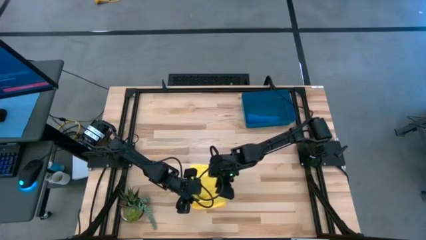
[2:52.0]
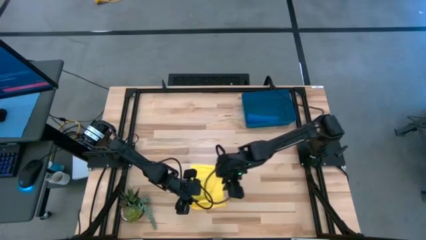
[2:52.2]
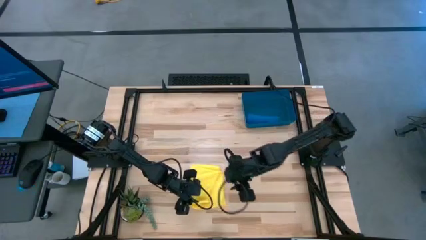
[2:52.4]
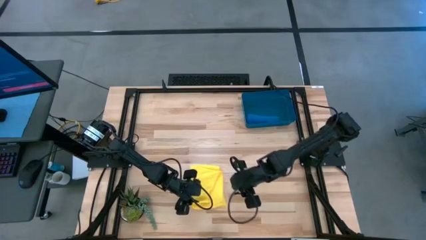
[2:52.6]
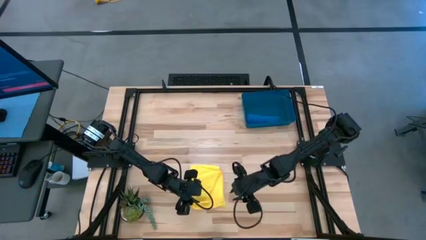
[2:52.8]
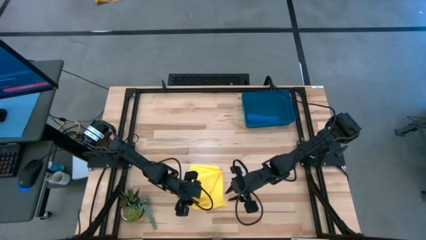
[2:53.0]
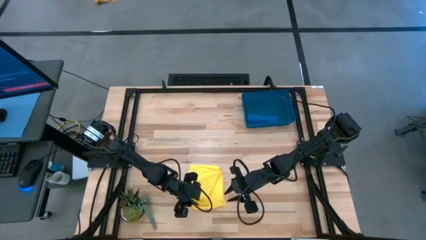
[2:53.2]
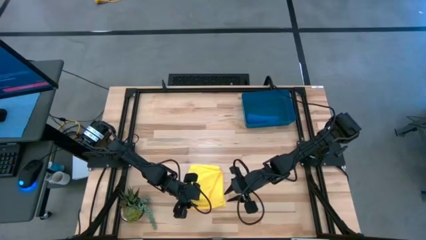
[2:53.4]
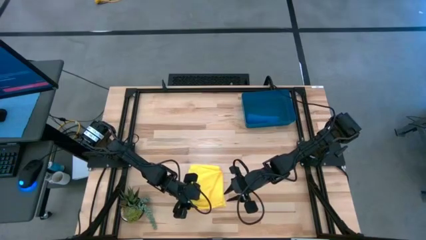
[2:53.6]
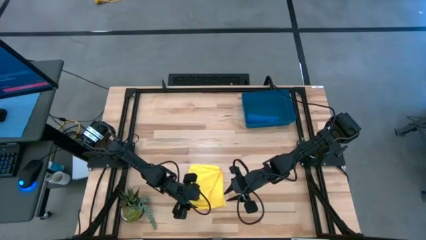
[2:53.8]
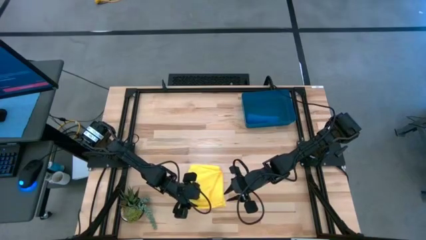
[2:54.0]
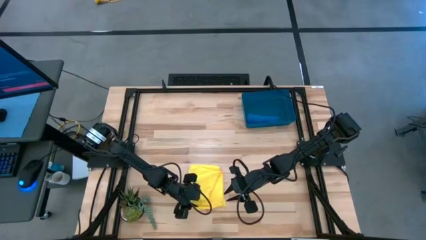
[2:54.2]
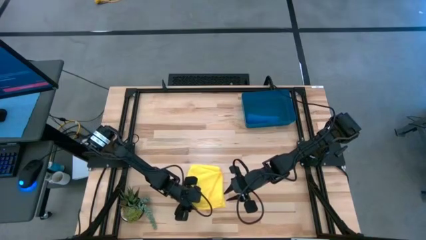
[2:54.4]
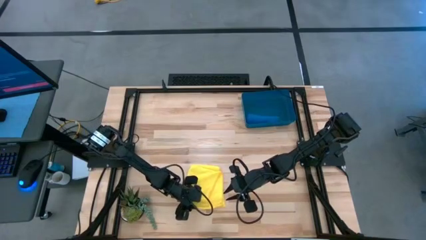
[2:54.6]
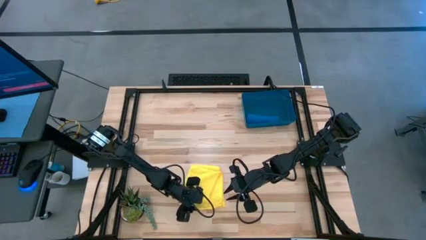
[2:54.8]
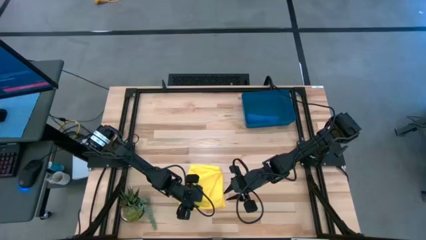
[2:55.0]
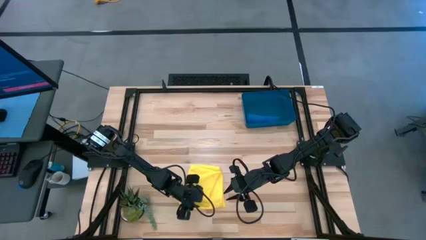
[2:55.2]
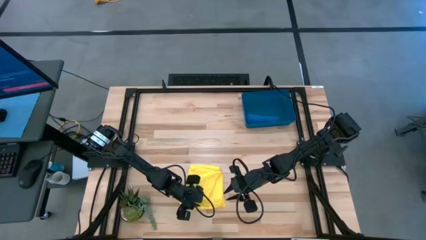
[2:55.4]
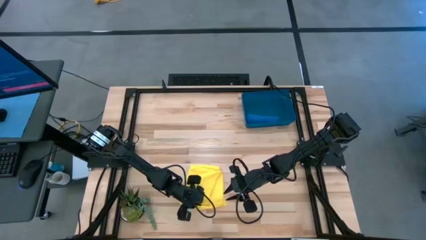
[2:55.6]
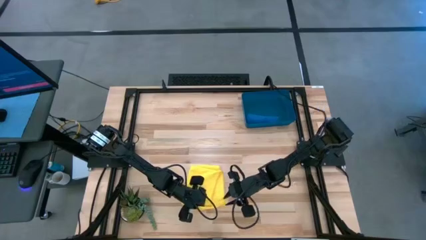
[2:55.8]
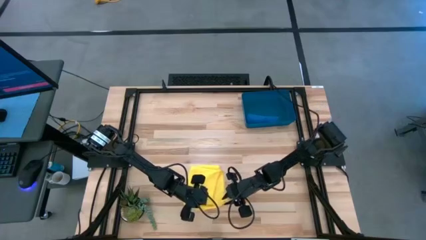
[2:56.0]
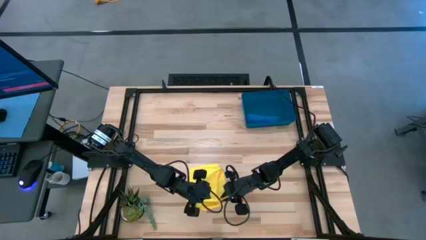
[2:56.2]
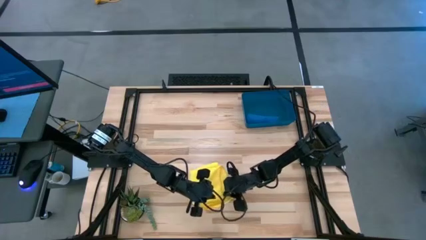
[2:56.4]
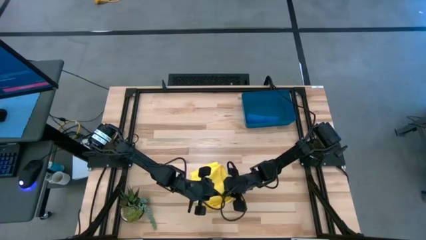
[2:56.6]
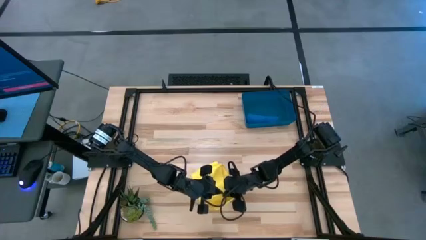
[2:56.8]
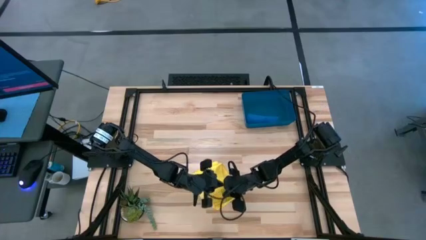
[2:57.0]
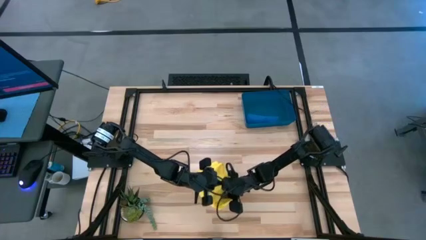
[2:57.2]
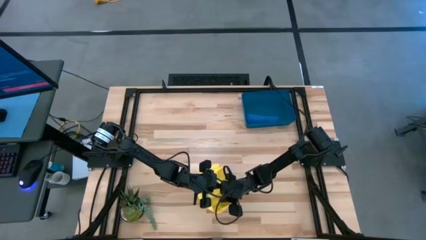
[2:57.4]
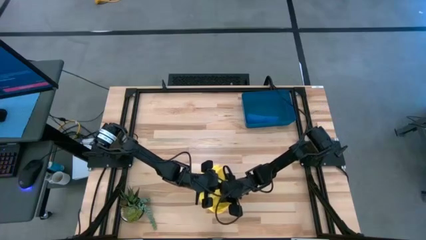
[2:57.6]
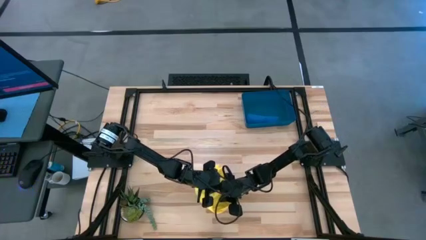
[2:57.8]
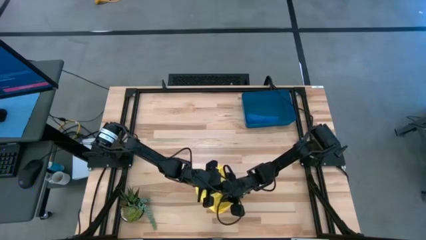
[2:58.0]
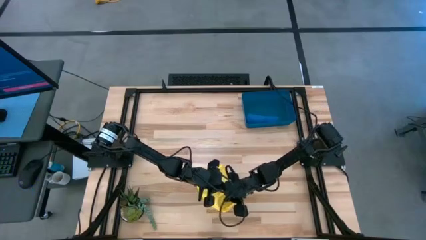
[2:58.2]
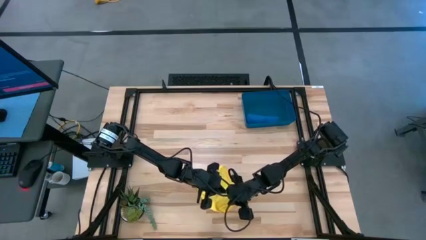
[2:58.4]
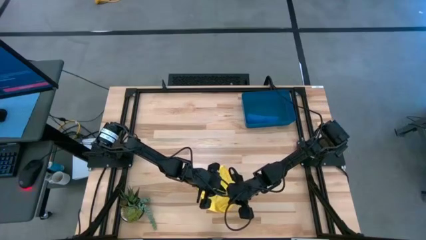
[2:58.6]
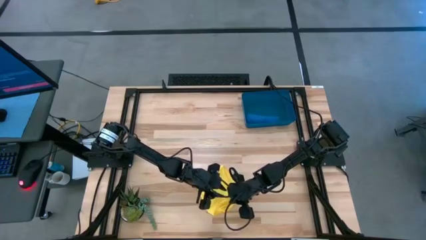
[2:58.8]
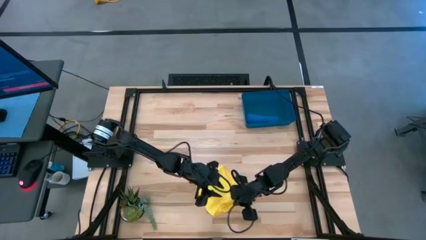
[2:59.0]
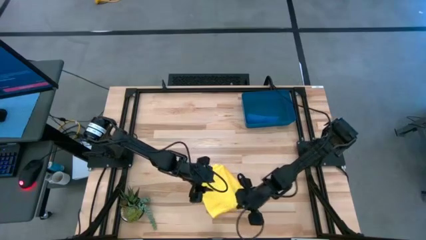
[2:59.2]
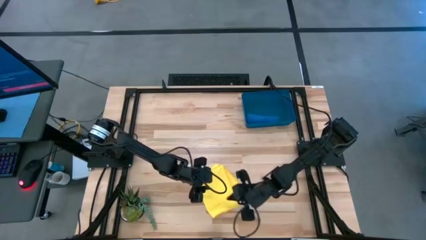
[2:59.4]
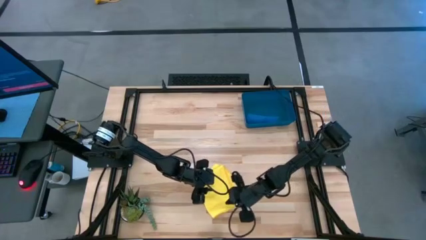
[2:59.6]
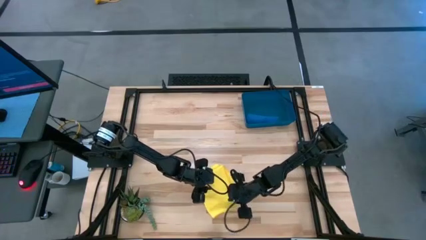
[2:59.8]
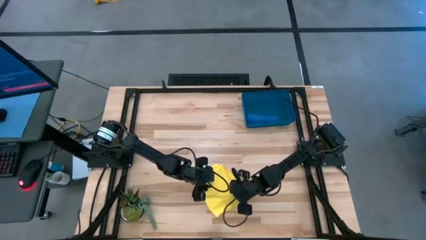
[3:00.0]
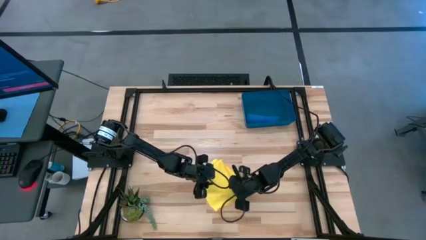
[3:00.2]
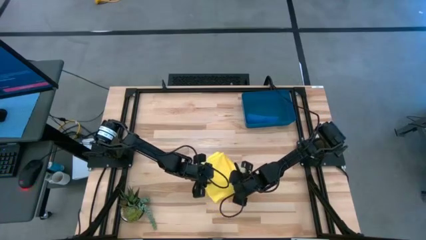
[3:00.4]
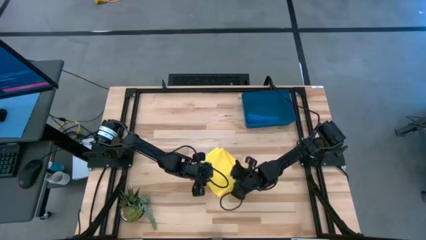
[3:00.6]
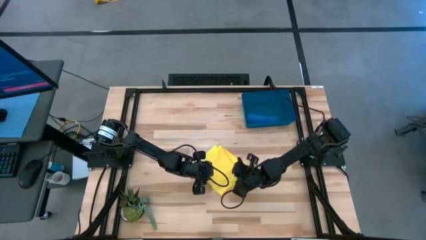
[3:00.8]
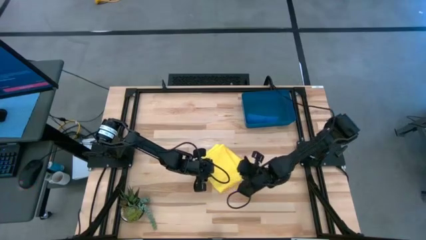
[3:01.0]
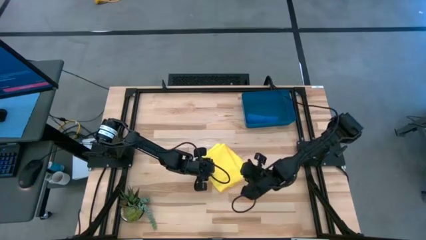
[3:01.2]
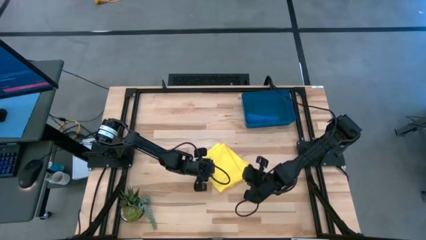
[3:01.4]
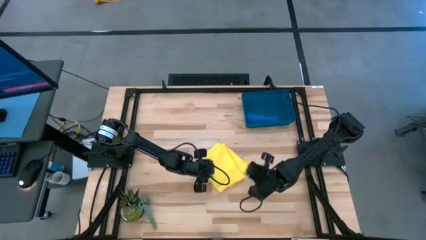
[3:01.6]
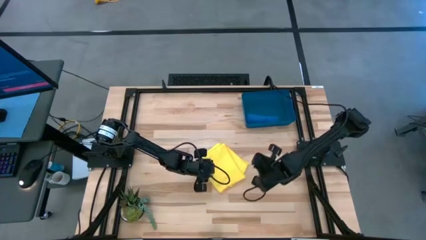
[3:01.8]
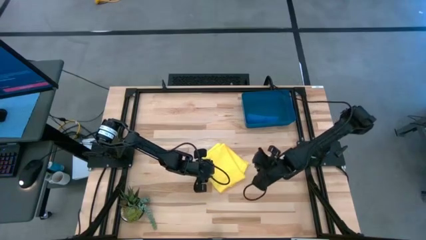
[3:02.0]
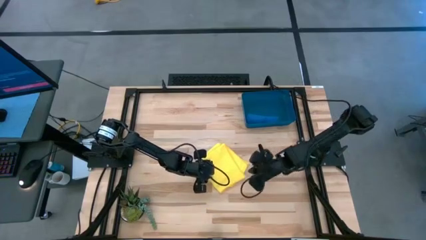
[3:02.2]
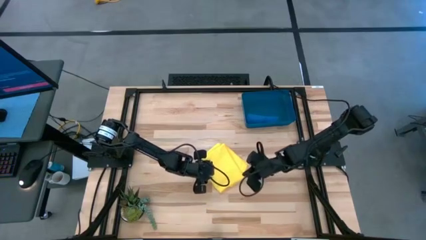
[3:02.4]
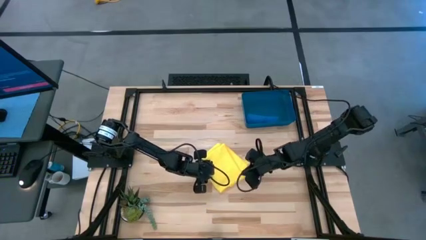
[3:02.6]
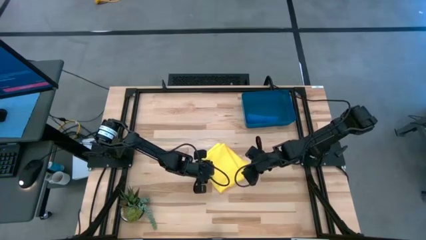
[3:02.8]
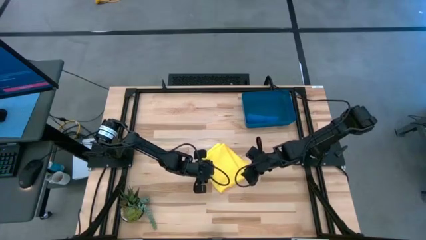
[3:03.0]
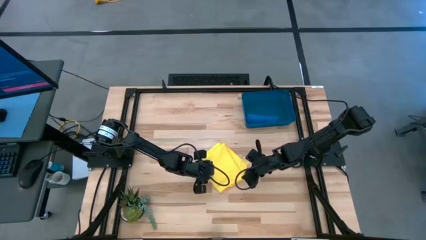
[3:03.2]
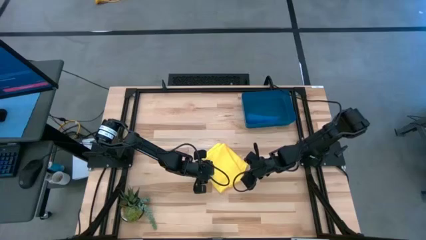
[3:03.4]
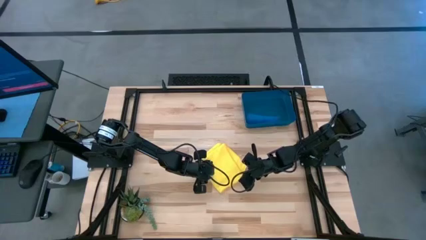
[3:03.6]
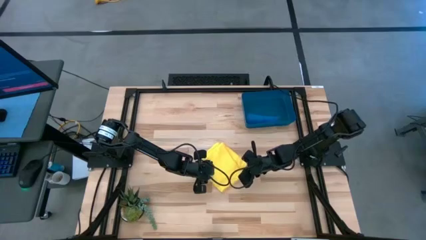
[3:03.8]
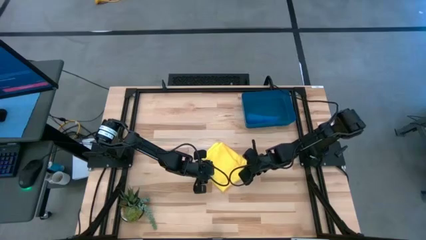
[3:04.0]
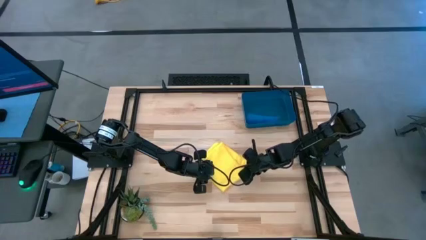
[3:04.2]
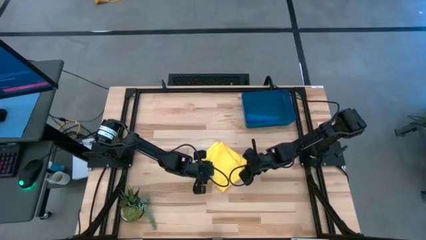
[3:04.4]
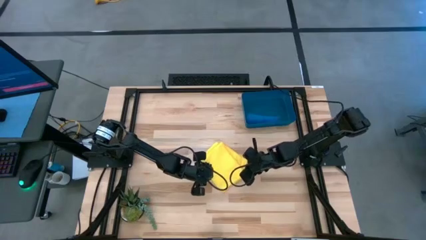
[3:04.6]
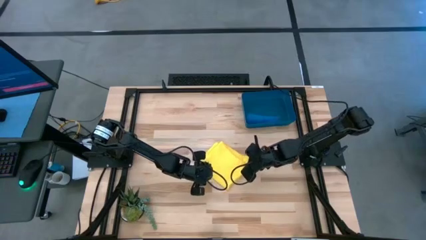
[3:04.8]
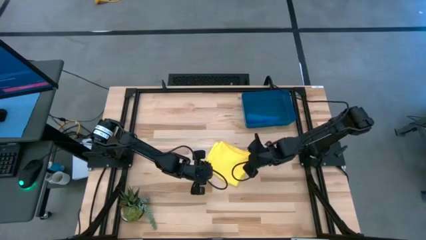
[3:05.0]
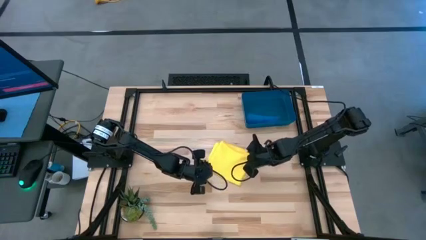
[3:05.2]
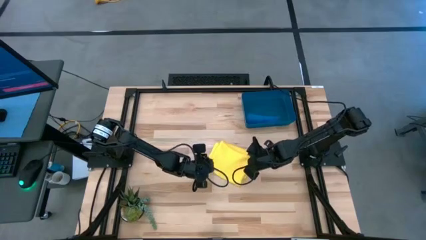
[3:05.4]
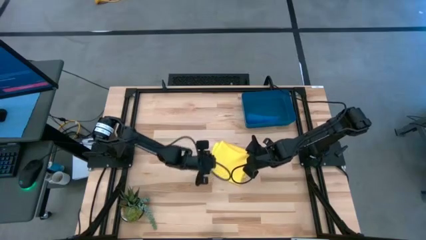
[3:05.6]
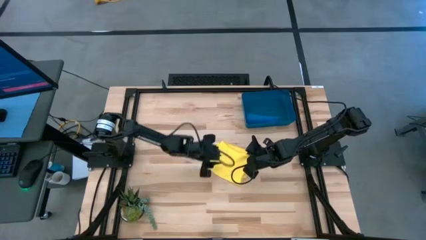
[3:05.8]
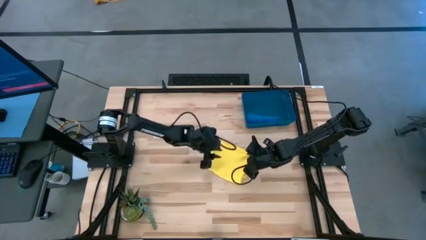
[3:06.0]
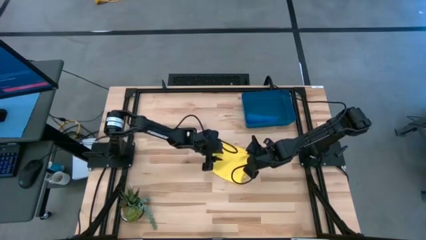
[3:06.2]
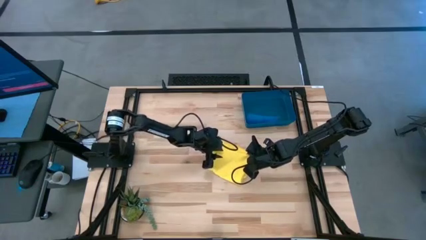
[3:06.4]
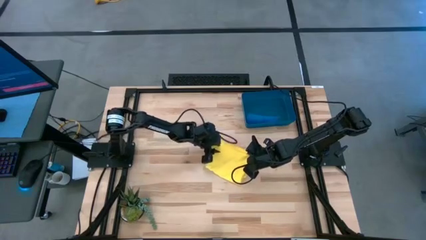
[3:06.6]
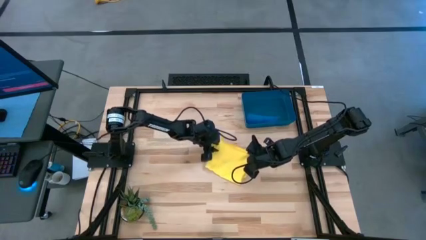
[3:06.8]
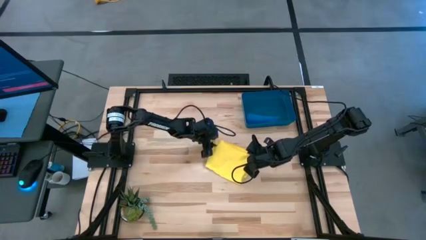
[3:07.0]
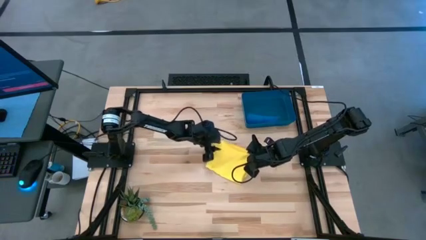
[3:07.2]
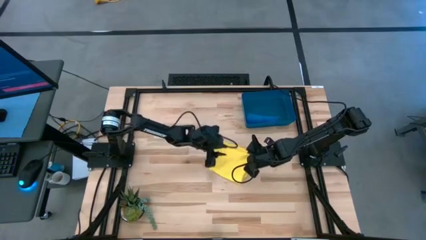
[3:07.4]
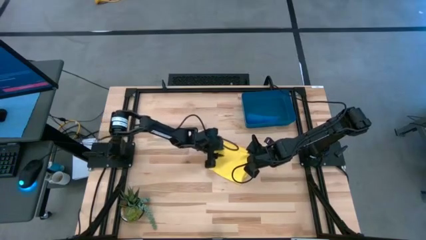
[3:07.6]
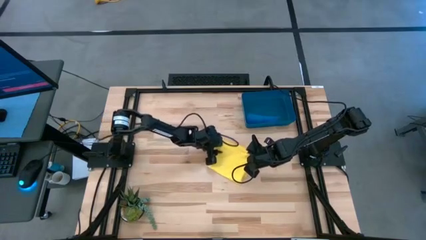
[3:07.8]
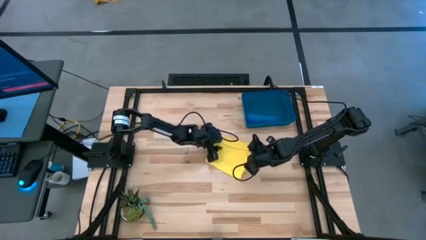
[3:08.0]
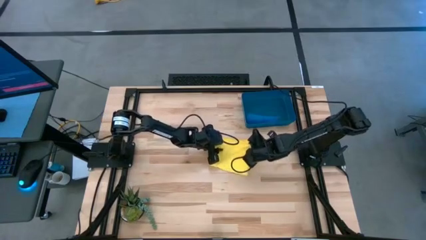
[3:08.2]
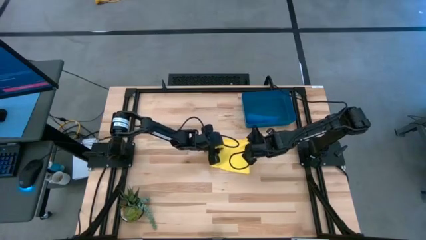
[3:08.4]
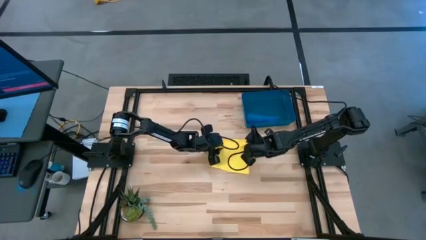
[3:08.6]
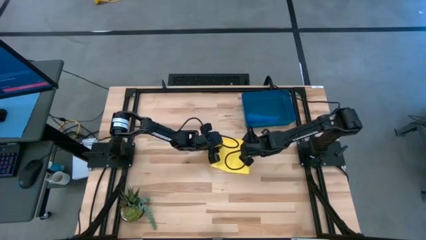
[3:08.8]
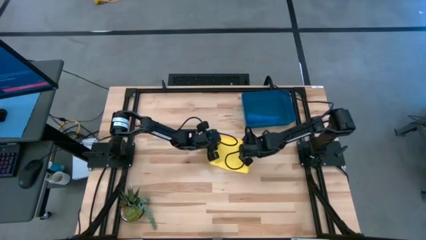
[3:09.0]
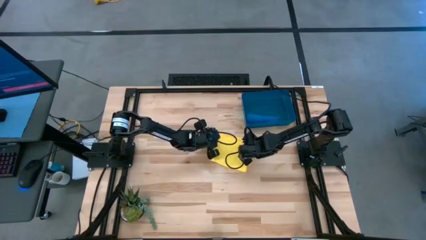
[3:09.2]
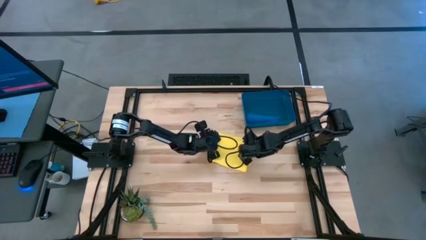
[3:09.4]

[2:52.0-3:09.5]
Task: Roll microfiber towels into tight, uniform cylinder then place into a basket
Roll the yellow microfiber cloth
